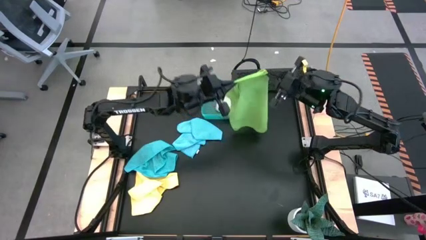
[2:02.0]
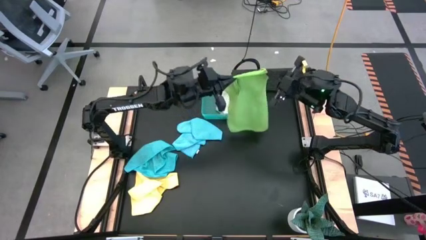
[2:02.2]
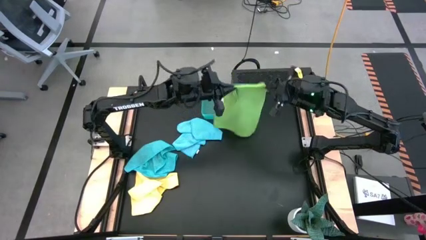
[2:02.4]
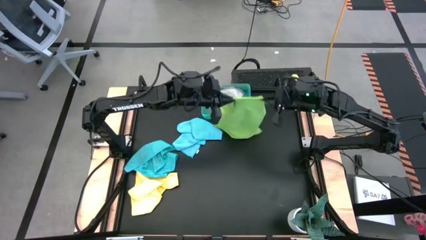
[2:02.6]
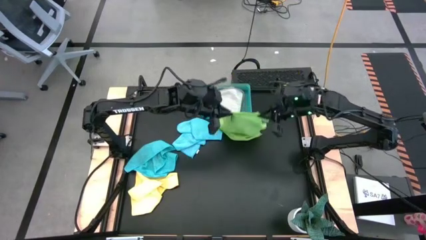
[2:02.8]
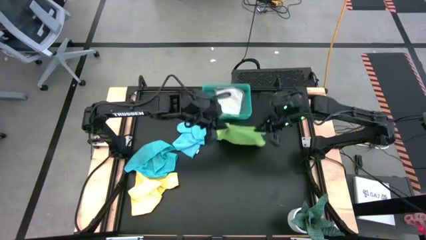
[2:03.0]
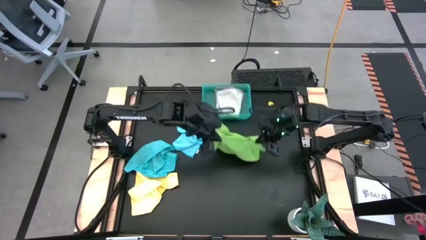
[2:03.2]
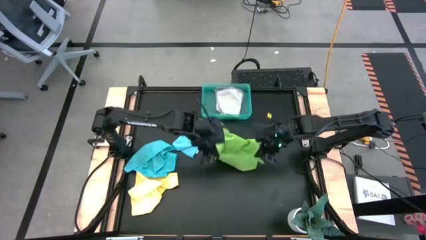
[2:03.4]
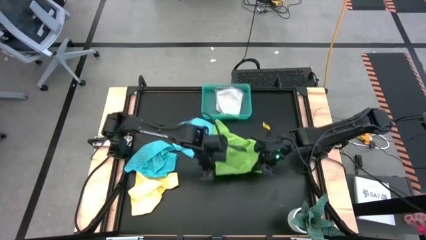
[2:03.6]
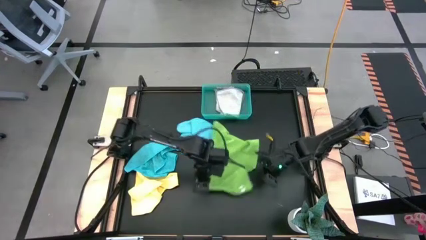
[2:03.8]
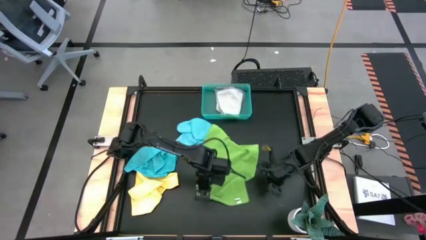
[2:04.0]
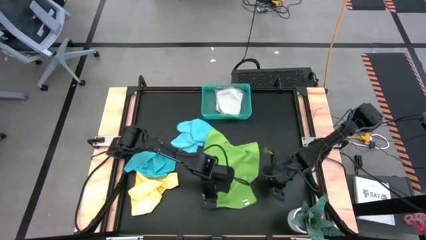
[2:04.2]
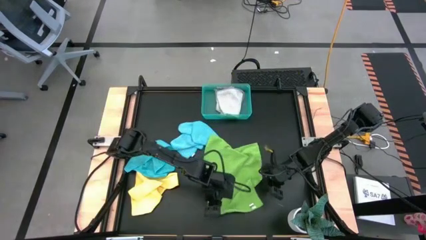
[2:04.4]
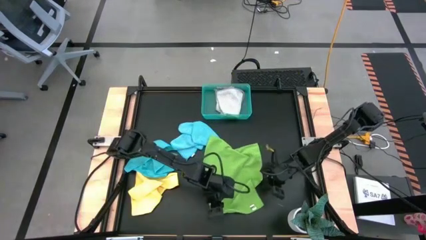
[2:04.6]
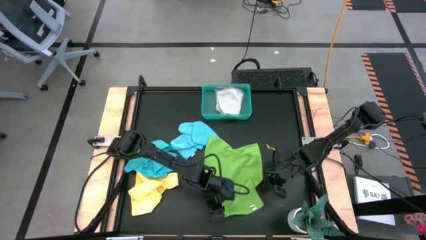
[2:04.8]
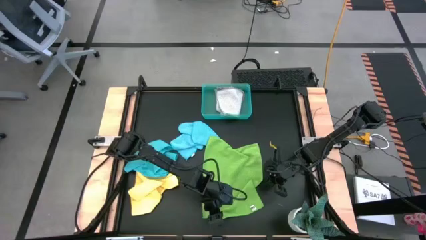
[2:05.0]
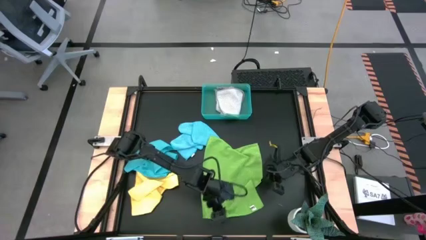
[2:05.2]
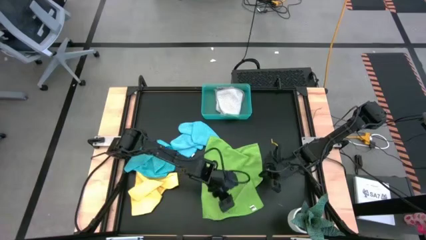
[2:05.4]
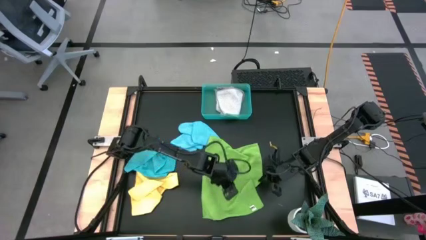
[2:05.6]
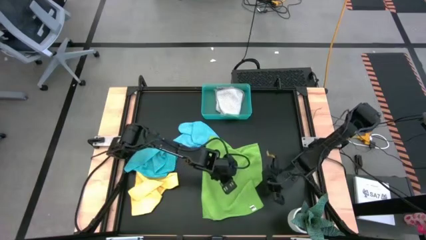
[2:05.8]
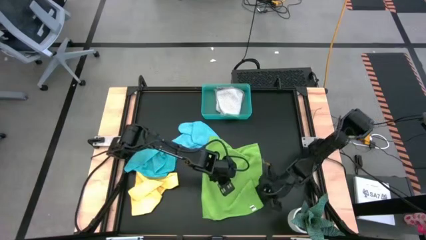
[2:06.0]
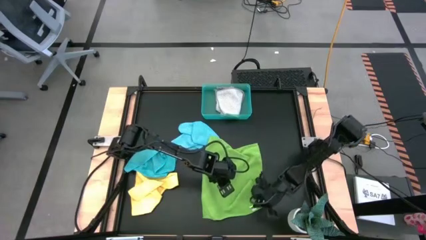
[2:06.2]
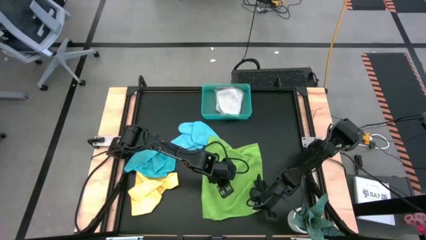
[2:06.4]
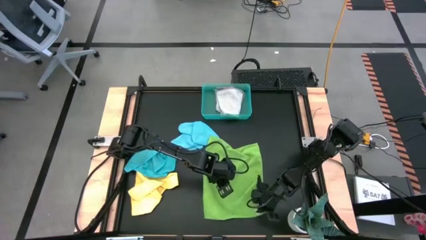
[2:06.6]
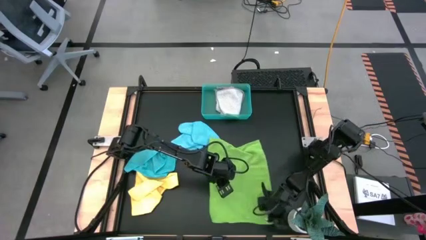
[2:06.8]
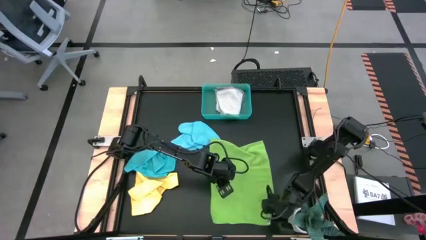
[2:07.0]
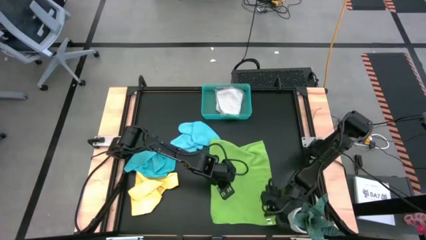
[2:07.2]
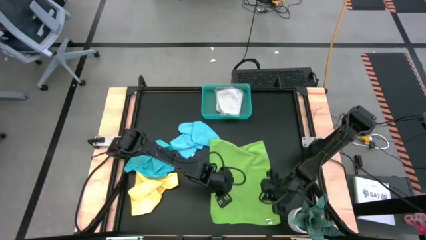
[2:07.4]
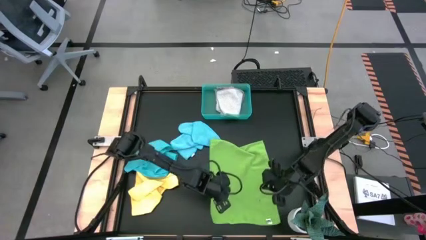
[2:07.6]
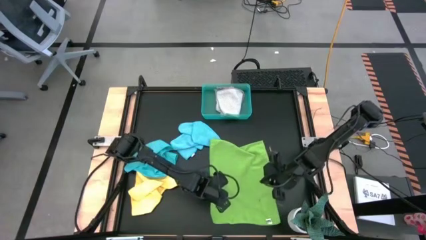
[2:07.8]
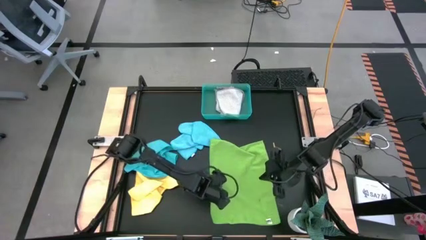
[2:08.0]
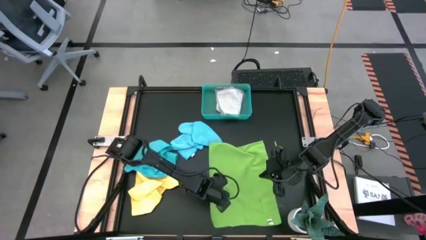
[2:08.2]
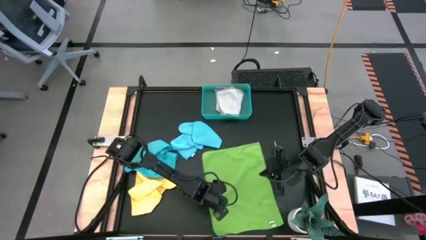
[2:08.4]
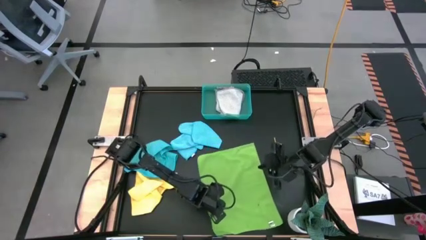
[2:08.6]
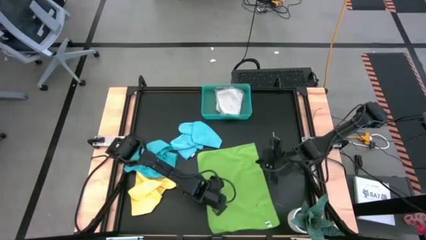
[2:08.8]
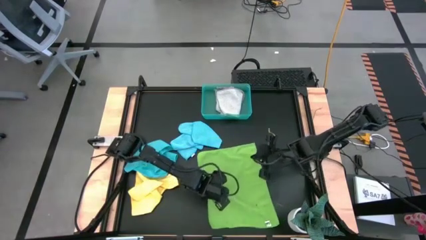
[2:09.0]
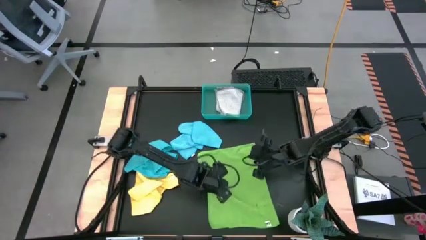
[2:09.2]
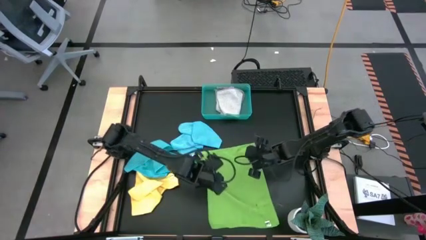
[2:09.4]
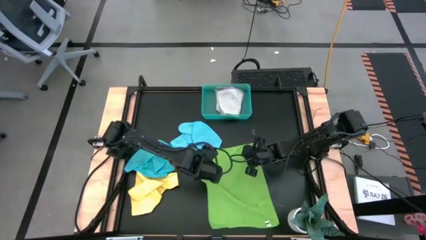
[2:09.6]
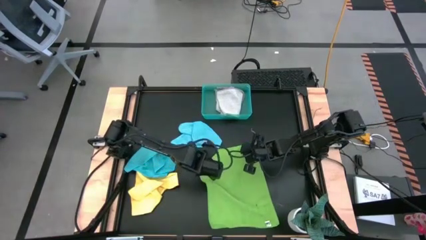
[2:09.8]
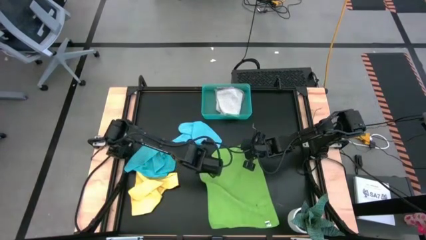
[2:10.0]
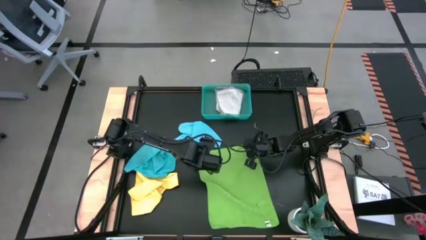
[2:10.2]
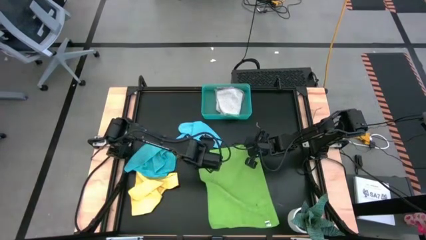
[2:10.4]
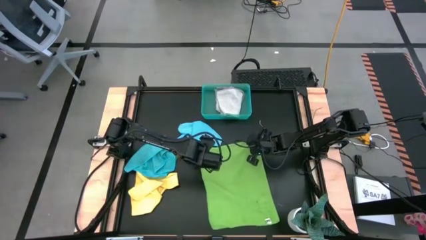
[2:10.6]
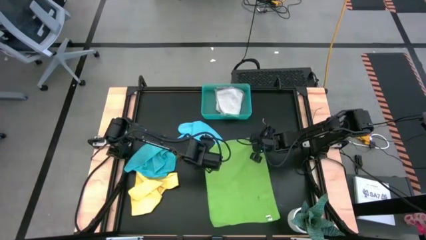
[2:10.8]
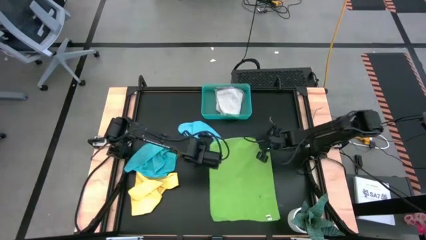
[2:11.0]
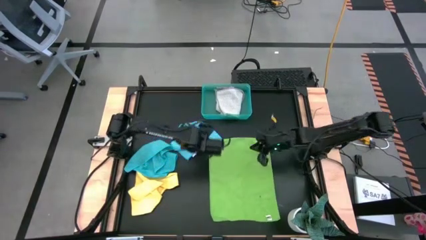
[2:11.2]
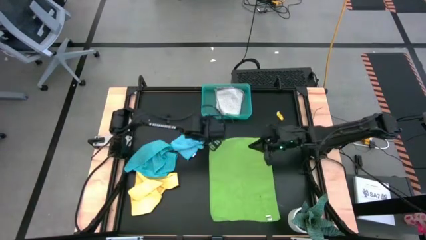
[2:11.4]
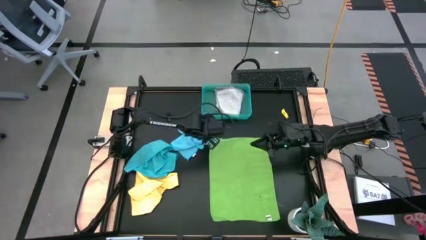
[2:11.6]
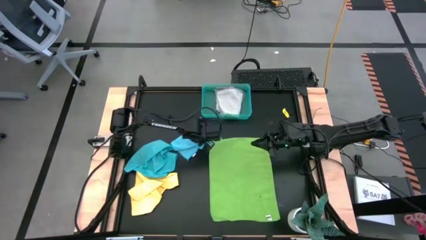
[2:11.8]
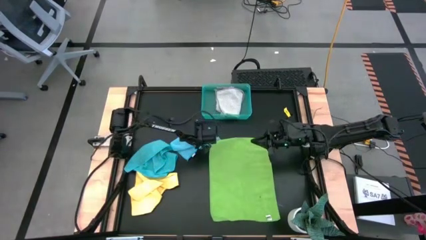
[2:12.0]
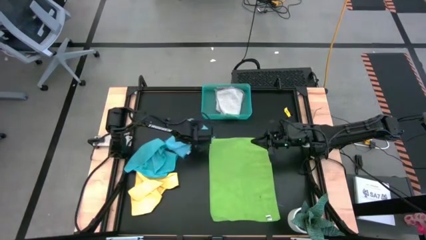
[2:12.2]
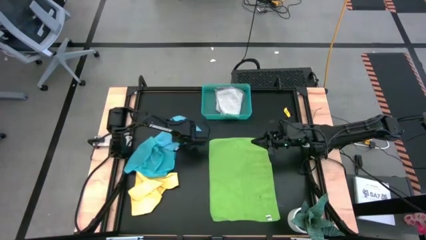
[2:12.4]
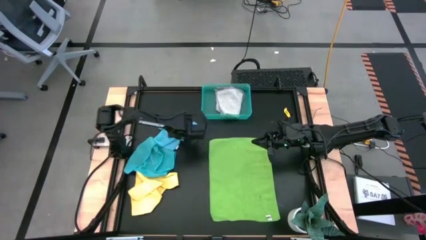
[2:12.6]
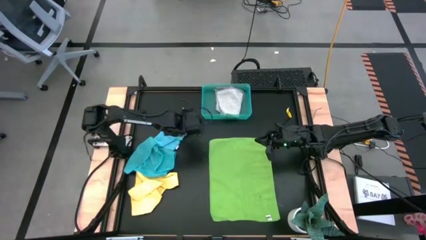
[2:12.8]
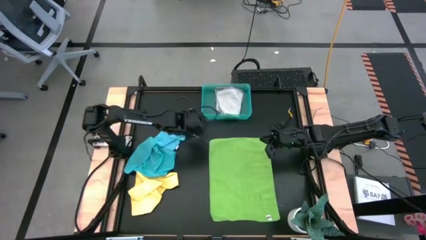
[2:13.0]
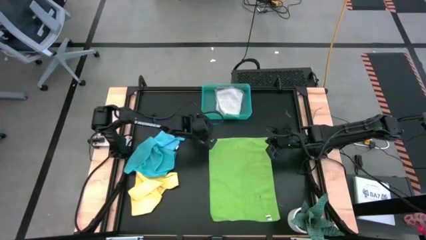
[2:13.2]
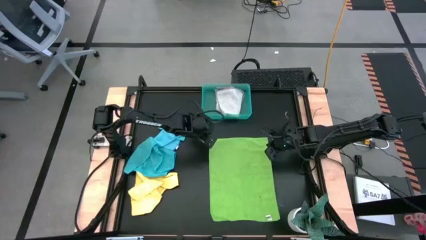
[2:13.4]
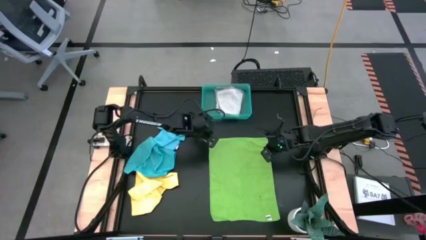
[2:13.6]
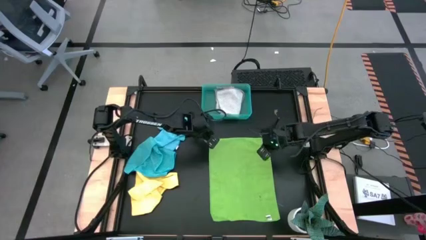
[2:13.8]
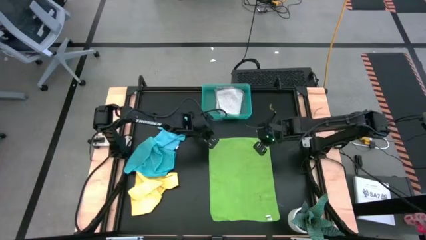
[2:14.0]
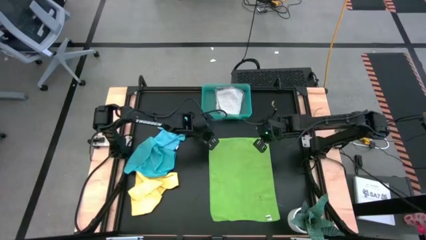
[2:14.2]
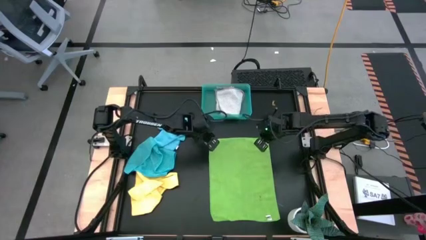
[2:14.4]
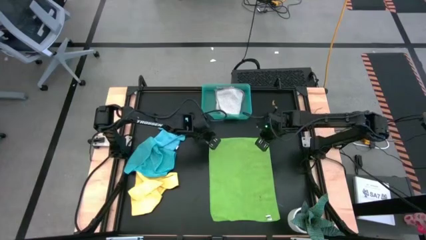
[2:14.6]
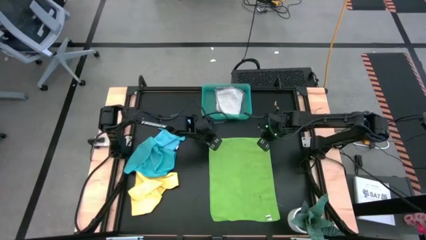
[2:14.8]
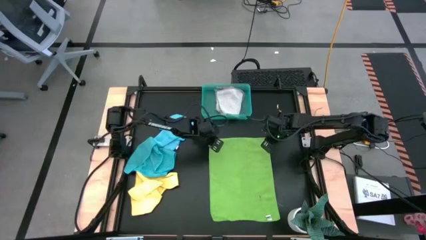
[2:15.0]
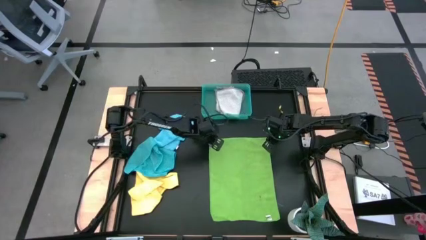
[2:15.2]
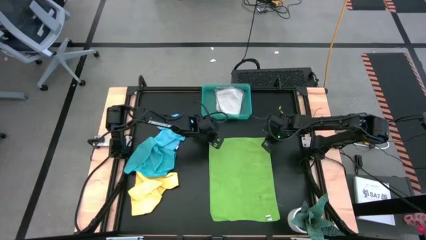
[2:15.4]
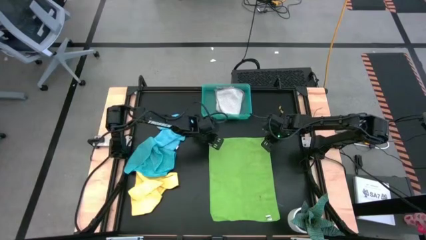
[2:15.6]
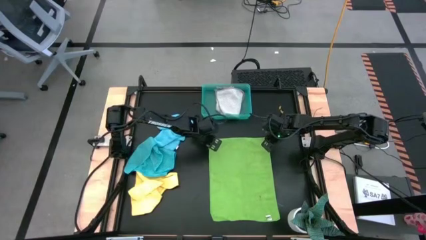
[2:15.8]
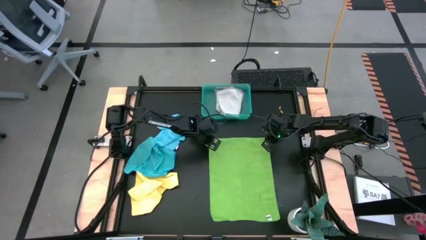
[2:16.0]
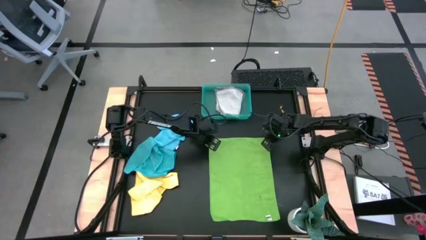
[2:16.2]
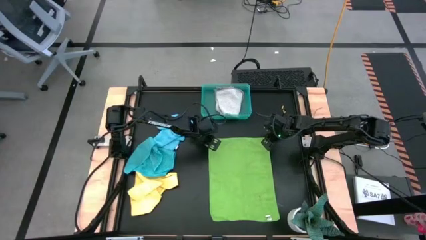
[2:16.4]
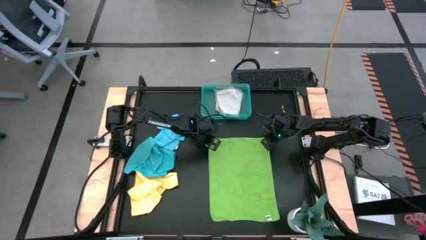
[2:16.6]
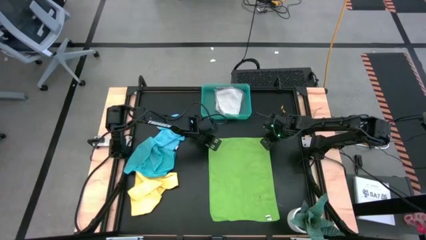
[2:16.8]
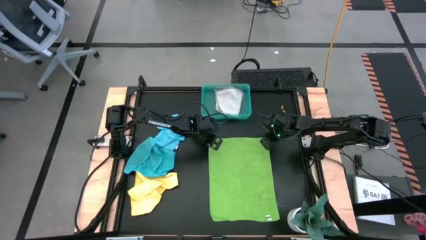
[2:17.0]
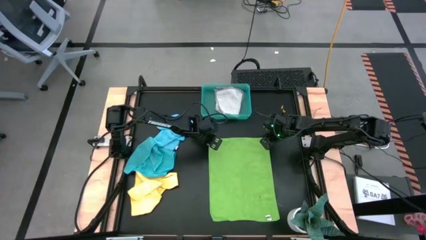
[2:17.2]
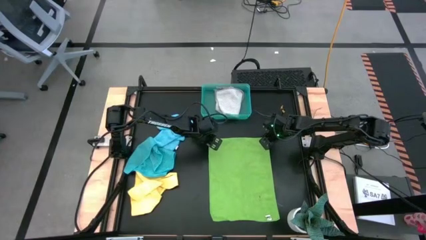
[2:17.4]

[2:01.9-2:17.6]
Task: Fold microfiber towels
Fold the green microfiber towel
